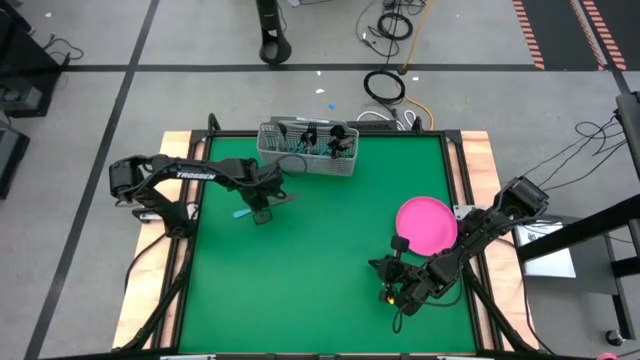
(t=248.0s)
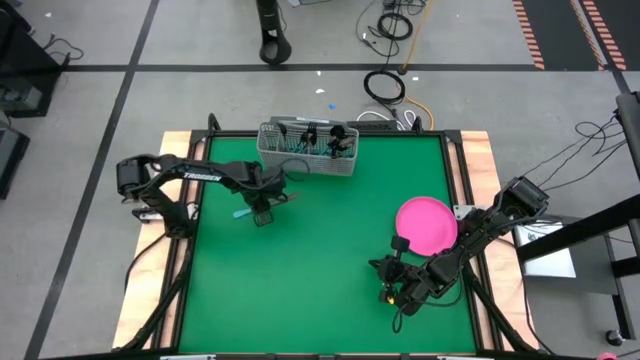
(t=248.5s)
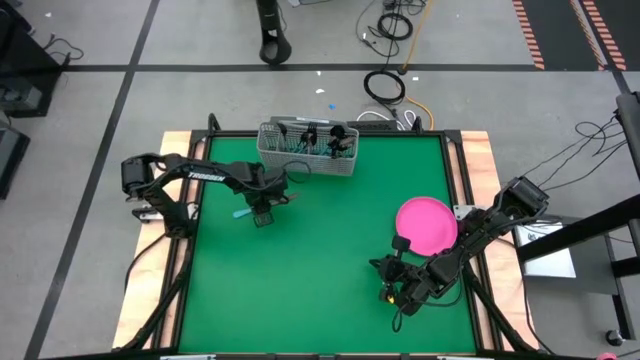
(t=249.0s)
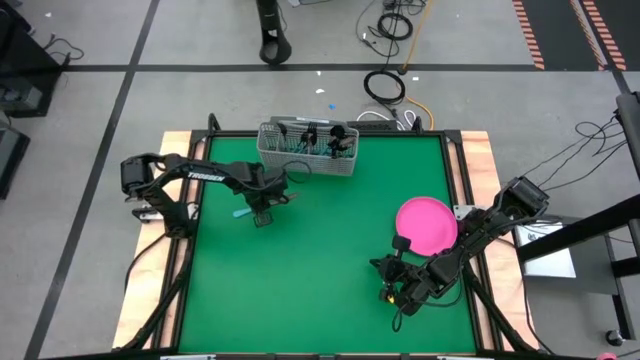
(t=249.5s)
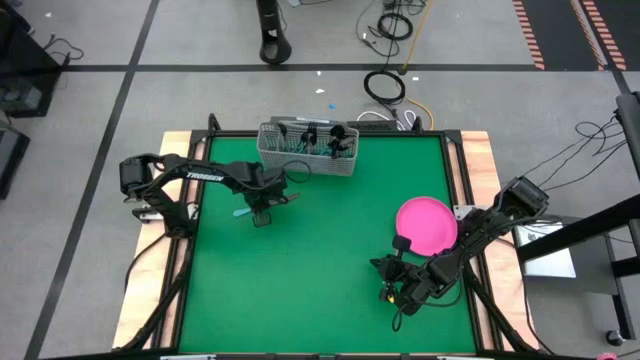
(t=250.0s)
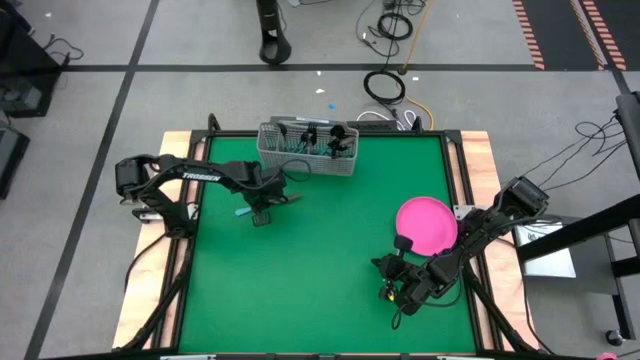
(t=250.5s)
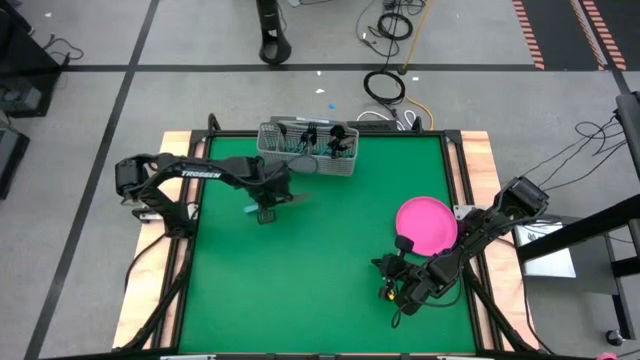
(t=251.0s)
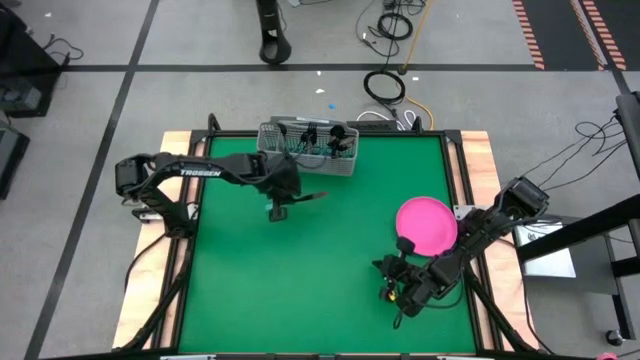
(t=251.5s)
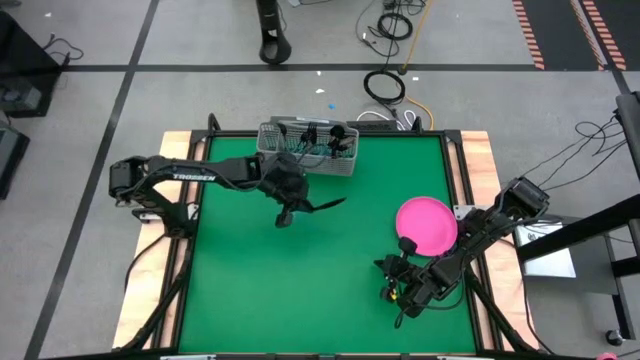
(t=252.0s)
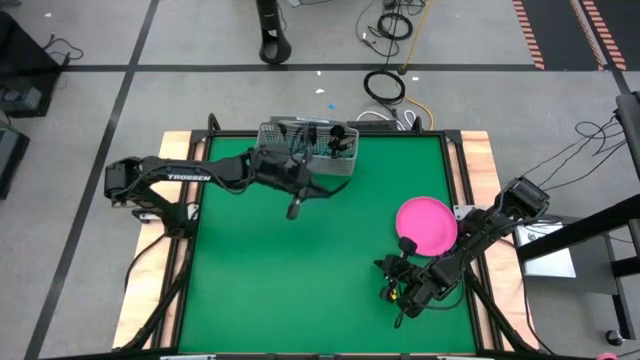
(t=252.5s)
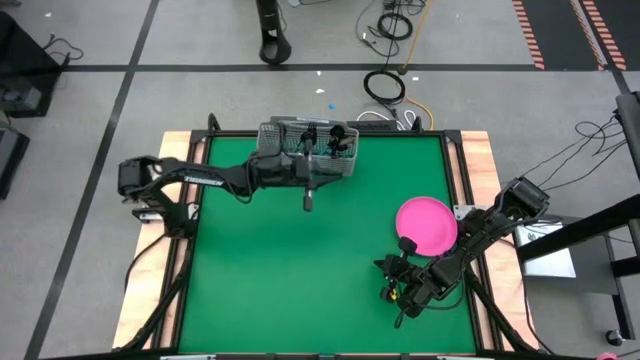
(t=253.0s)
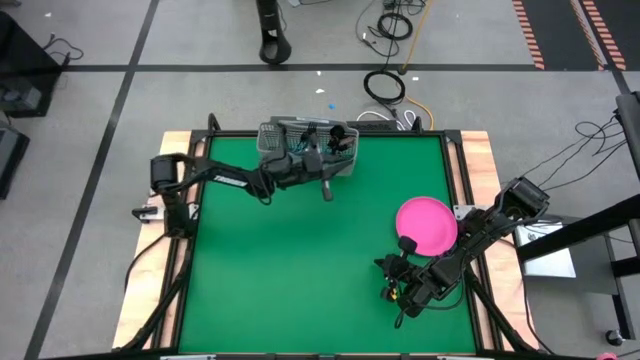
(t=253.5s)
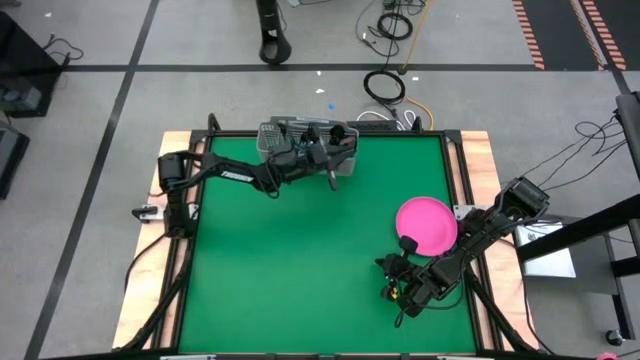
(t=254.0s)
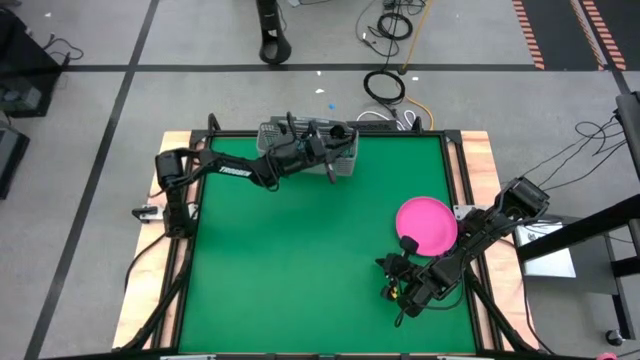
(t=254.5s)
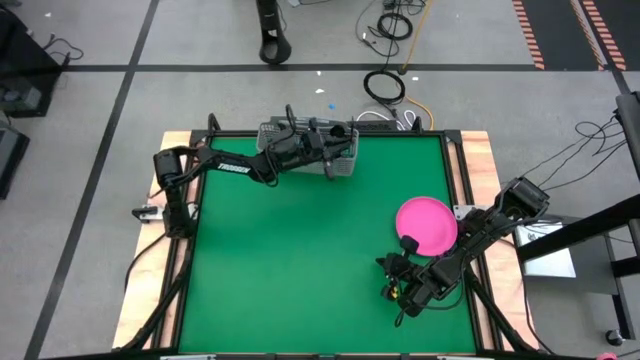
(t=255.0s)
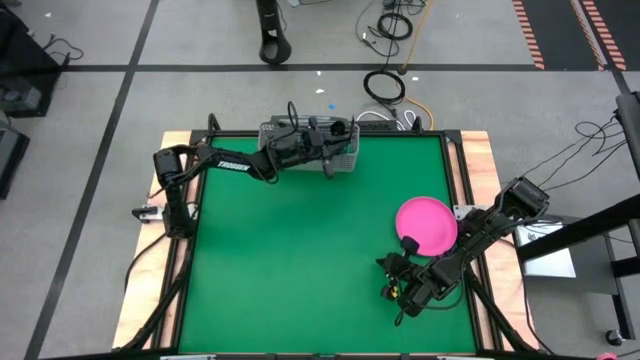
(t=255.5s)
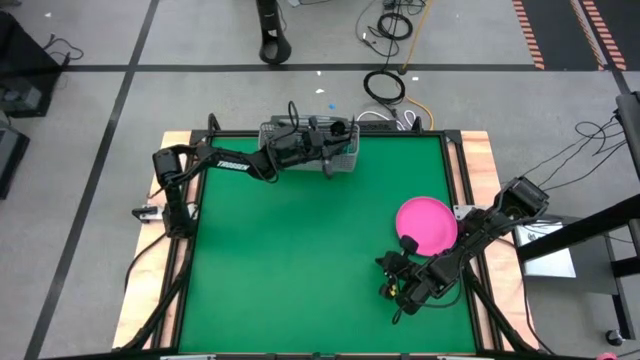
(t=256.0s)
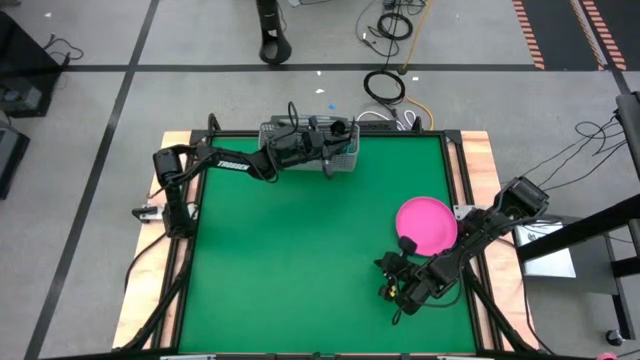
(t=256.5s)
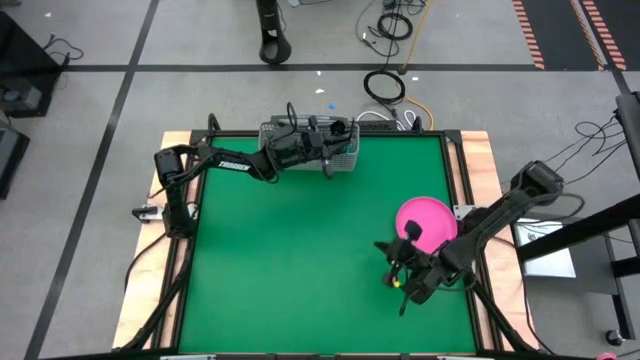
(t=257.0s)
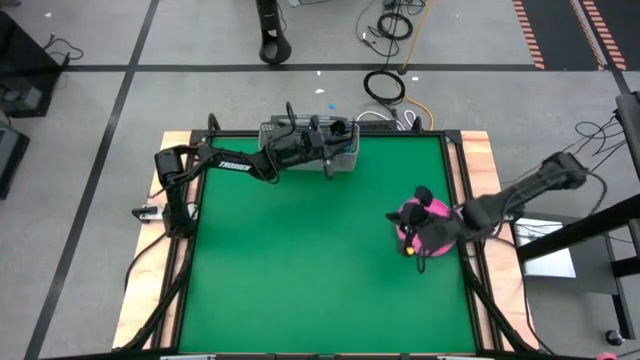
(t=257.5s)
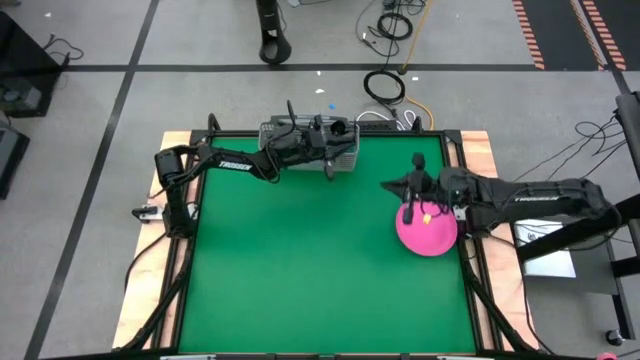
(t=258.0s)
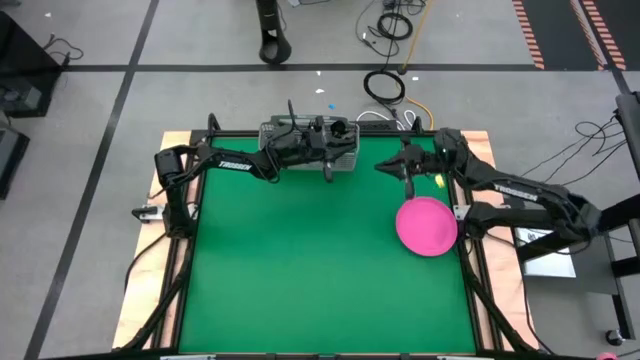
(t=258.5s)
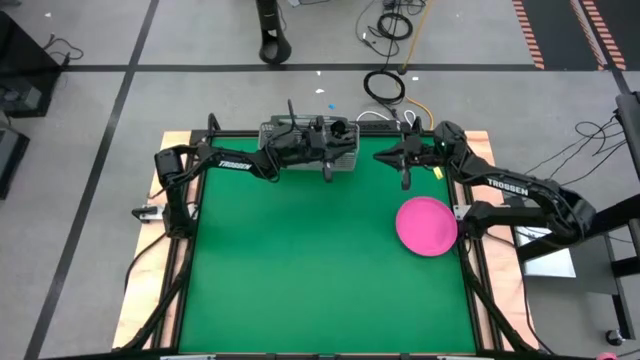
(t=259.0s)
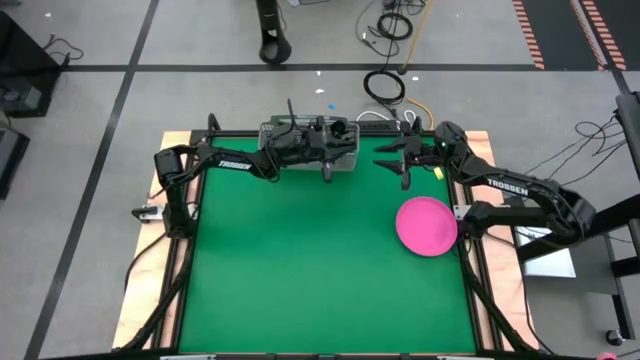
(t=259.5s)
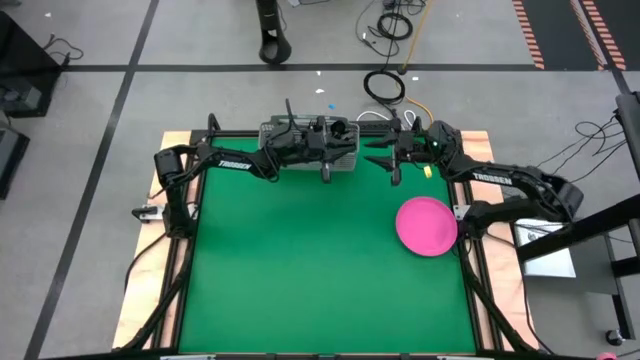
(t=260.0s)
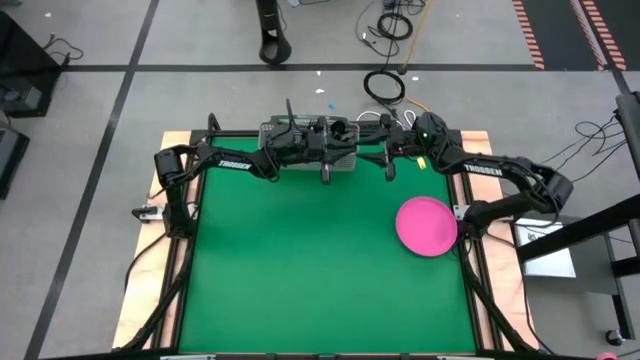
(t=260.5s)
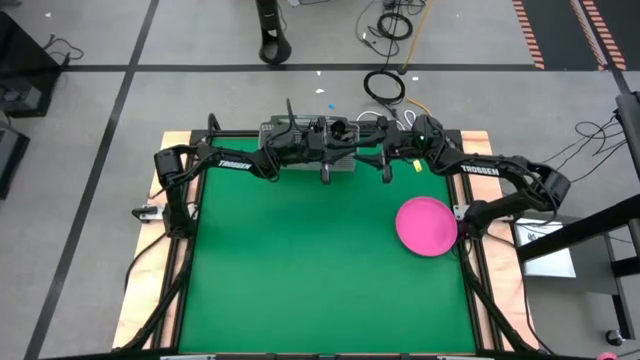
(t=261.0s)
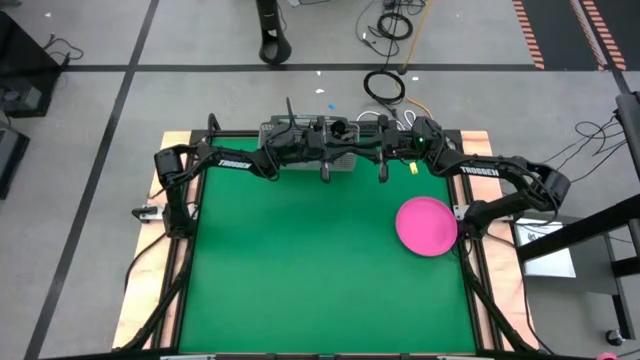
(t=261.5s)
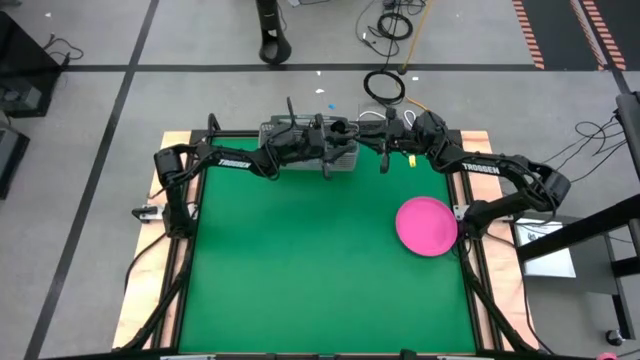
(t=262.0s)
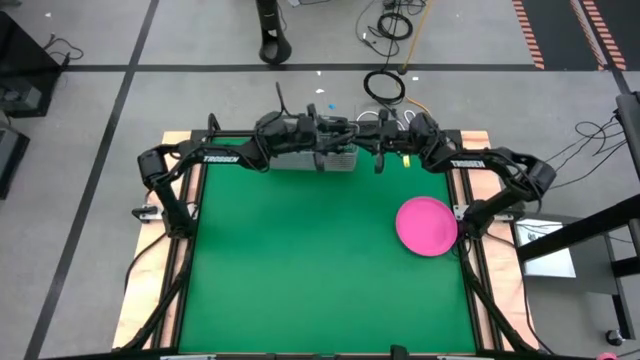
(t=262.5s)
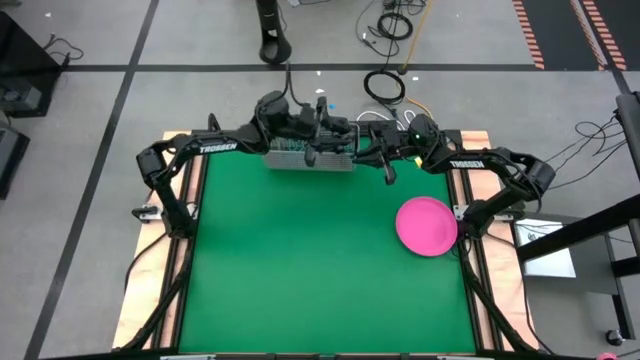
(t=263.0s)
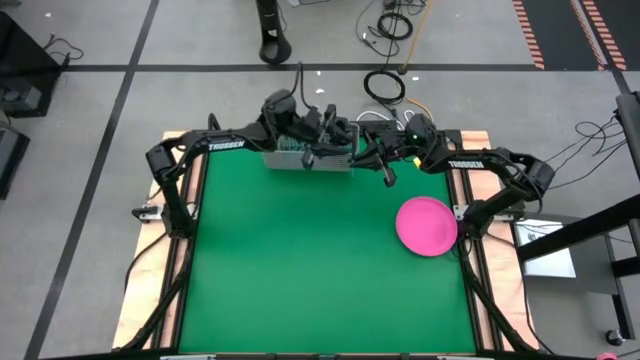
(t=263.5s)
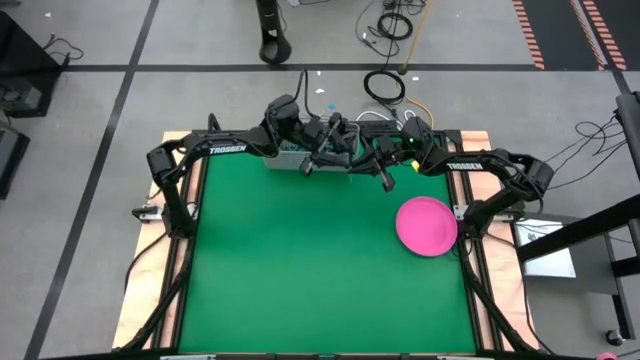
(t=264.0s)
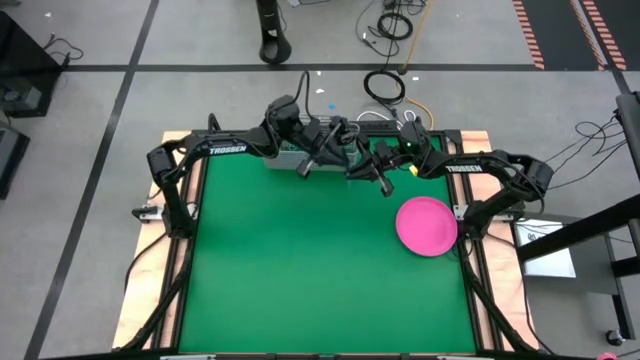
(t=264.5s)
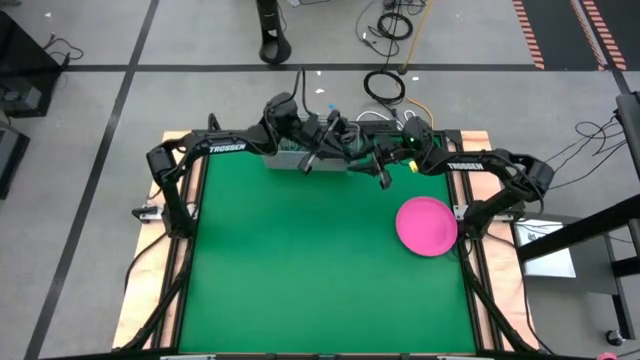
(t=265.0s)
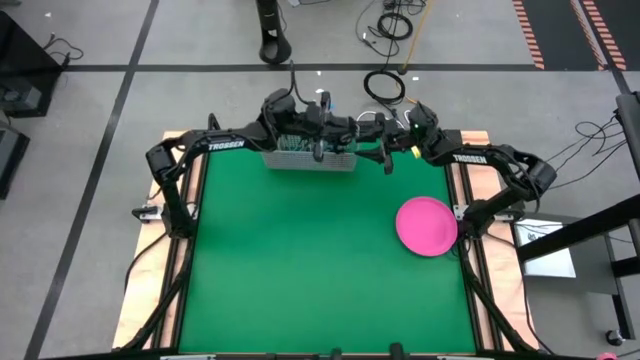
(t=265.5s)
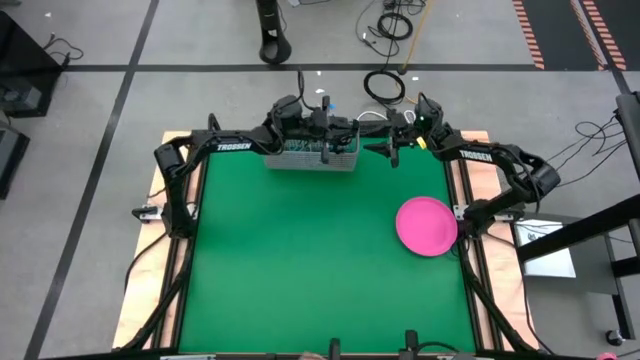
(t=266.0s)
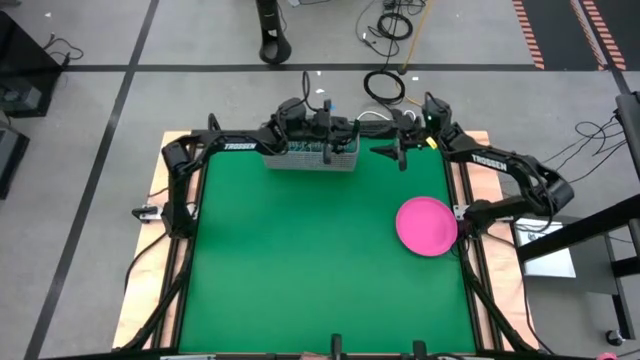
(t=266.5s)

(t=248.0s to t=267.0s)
Task: Sort silverware
Put the blue table knife into the silverware tray with the other blue table knives

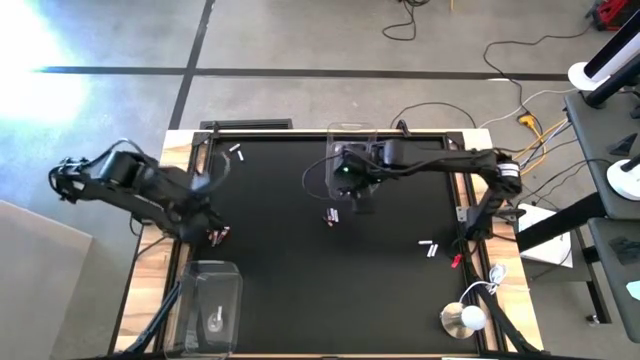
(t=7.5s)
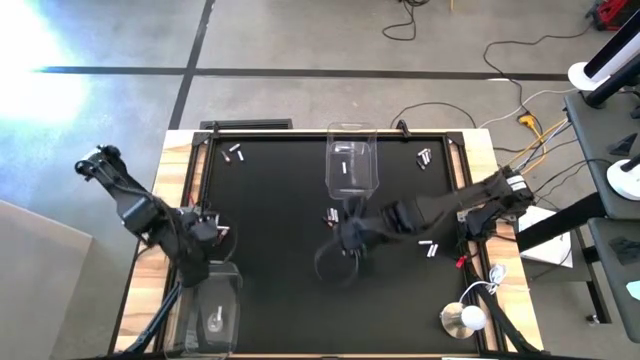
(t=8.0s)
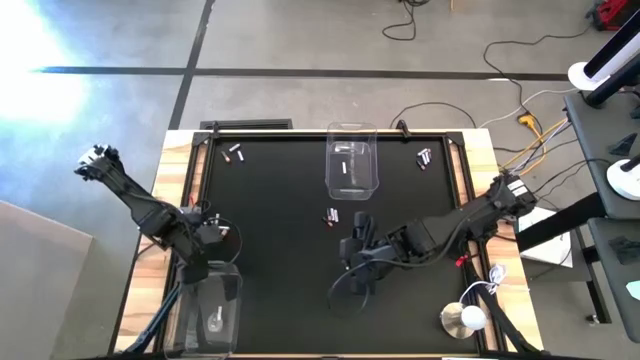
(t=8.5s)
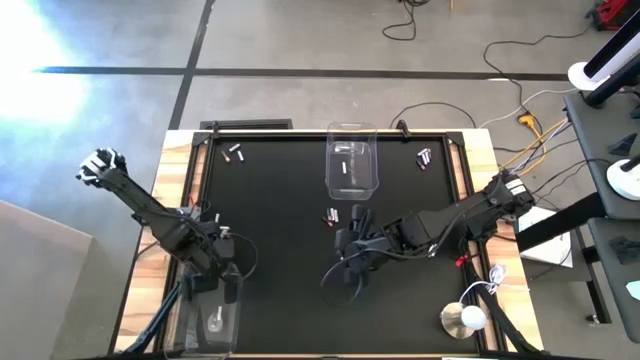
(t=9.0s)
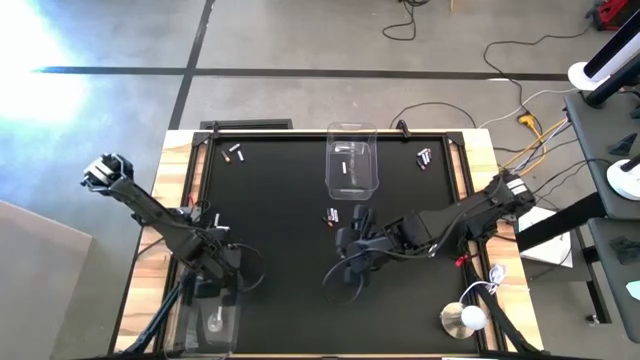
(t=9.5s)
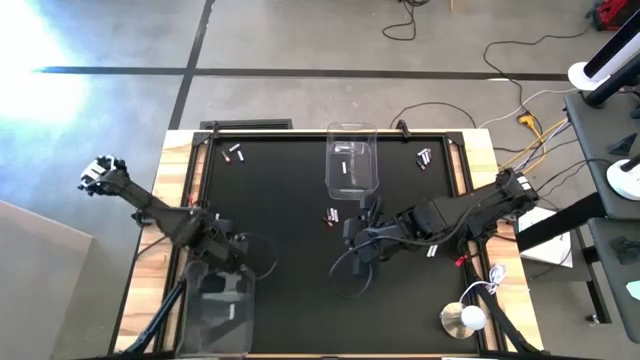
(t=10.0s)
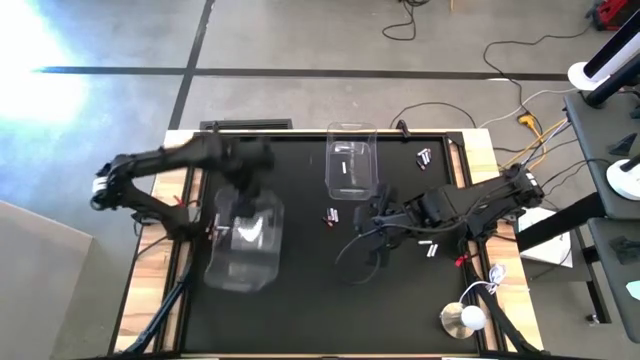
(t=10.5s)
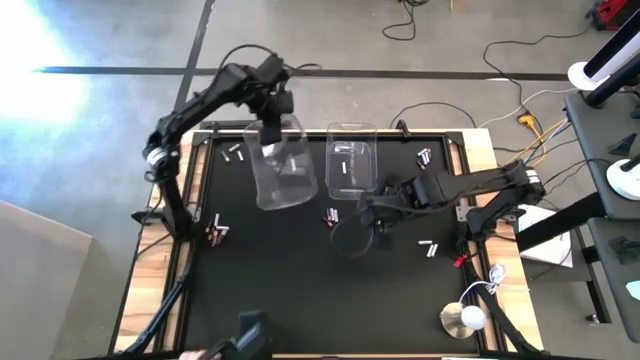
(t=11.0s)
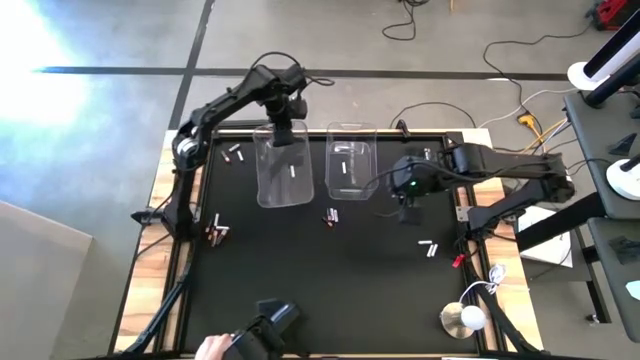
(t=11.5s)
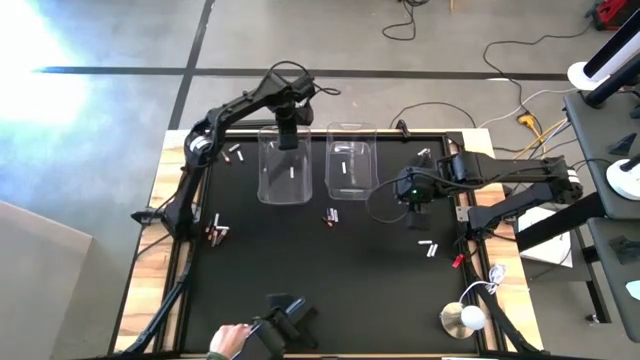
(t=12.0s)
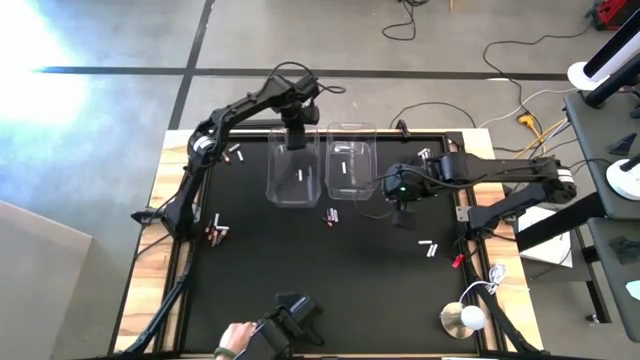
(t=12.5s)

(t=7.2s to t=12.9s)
Task: Sort batteries
Move the left transparent bin to the left side of the right transparent bin
